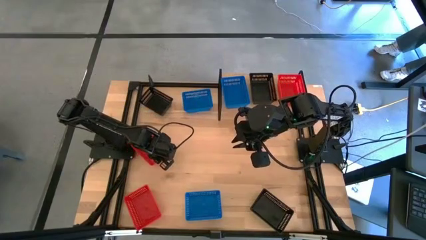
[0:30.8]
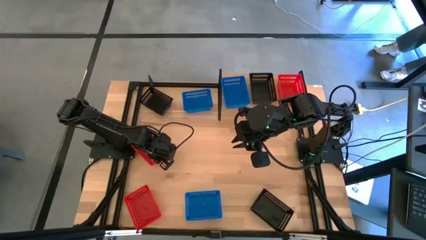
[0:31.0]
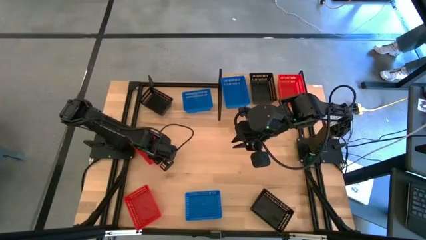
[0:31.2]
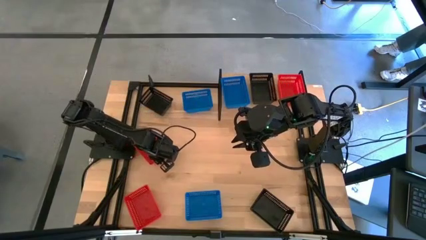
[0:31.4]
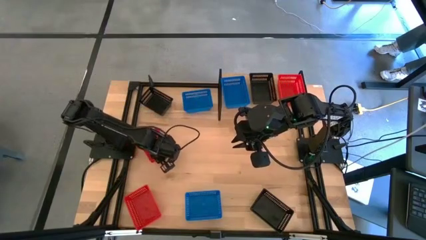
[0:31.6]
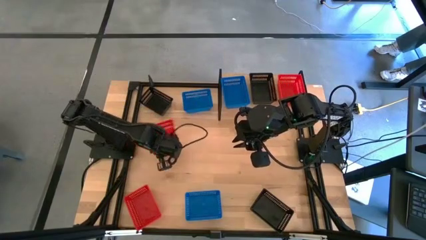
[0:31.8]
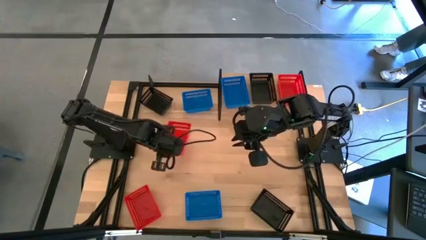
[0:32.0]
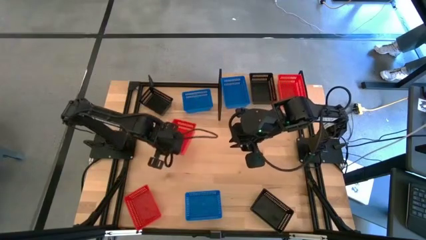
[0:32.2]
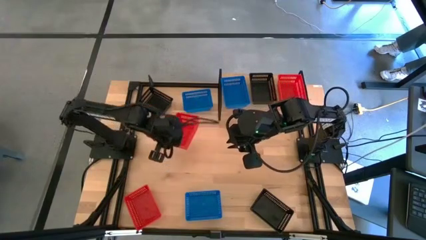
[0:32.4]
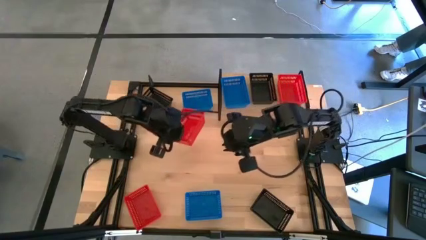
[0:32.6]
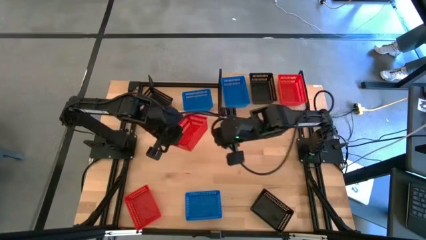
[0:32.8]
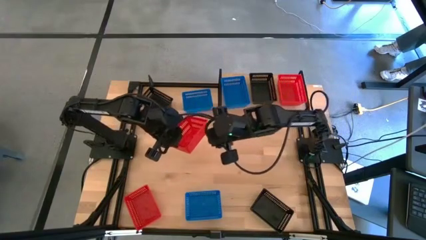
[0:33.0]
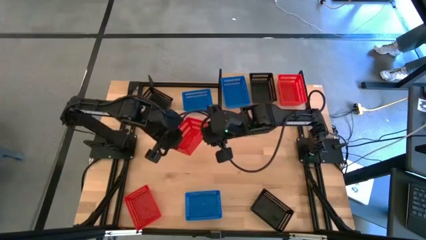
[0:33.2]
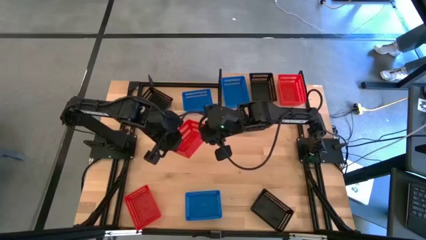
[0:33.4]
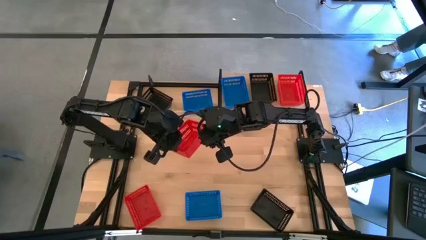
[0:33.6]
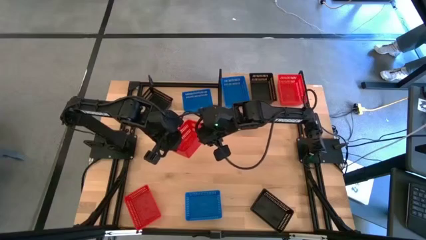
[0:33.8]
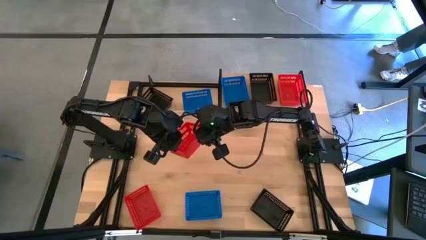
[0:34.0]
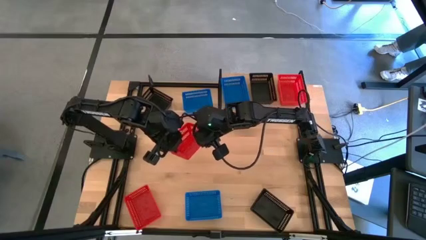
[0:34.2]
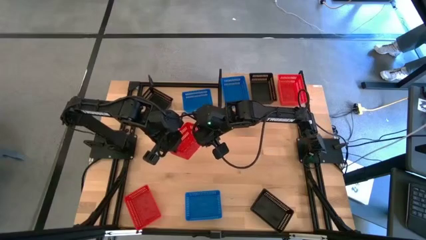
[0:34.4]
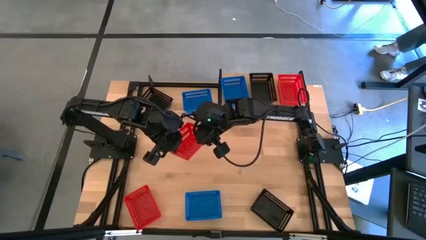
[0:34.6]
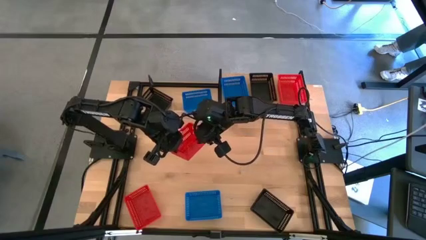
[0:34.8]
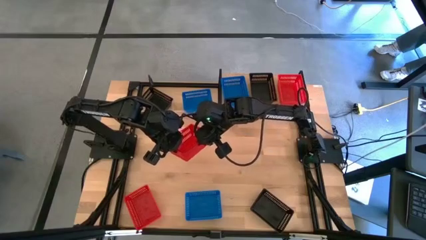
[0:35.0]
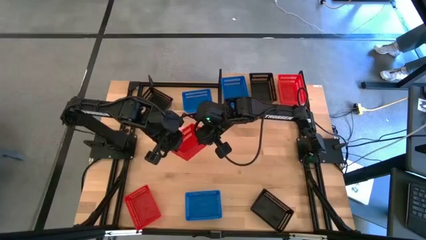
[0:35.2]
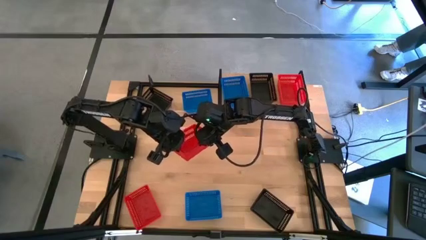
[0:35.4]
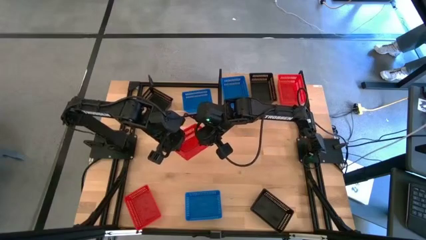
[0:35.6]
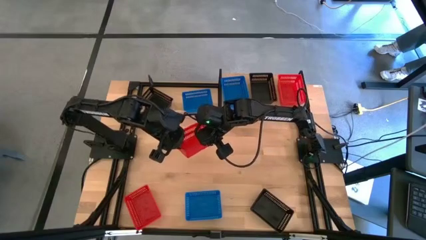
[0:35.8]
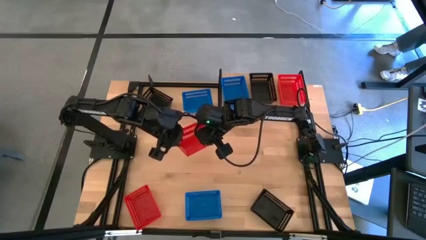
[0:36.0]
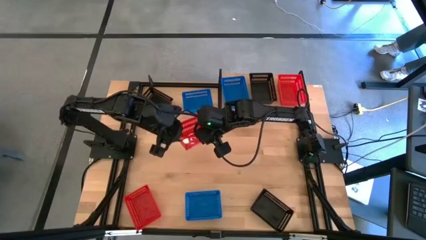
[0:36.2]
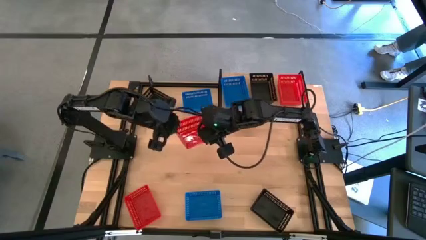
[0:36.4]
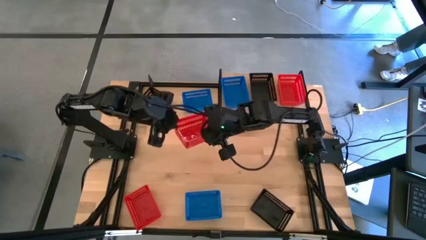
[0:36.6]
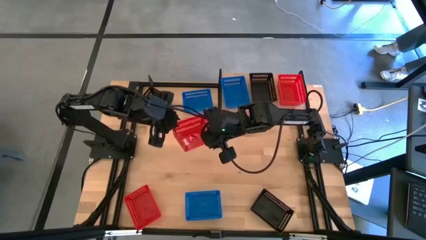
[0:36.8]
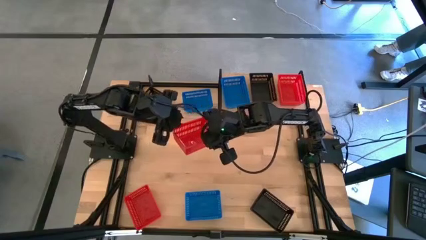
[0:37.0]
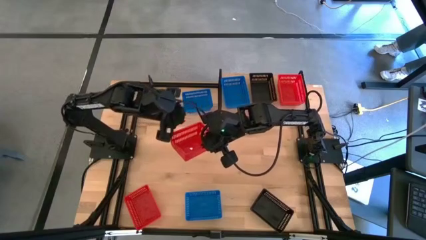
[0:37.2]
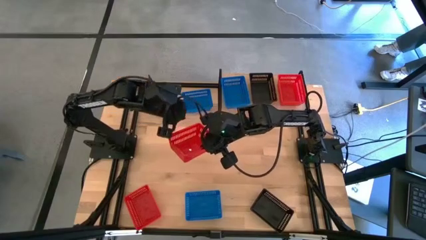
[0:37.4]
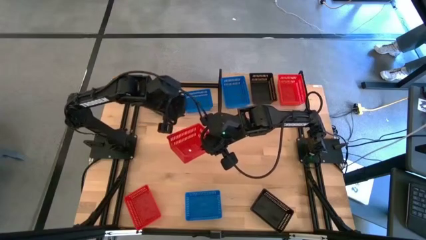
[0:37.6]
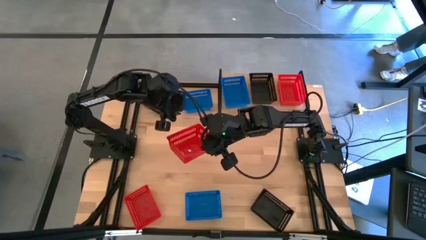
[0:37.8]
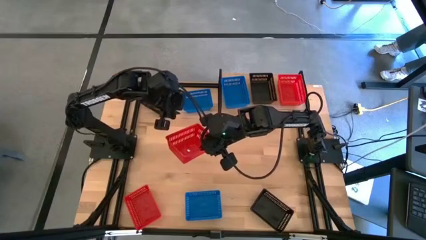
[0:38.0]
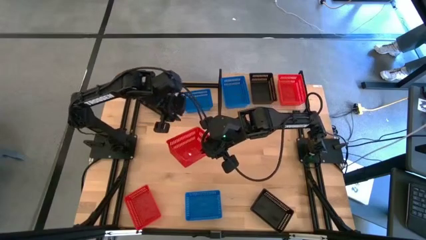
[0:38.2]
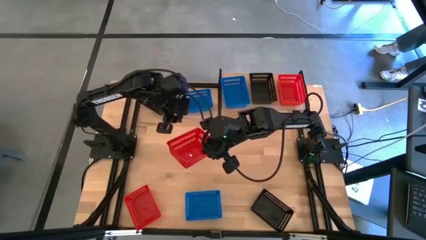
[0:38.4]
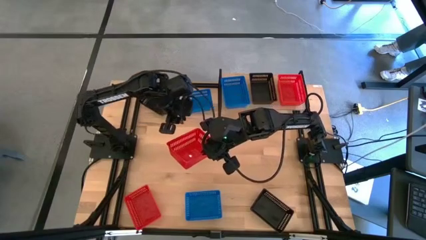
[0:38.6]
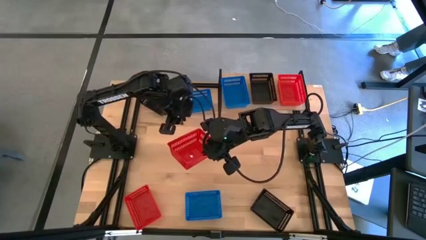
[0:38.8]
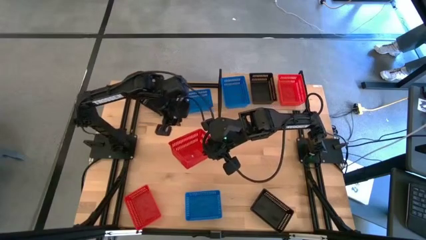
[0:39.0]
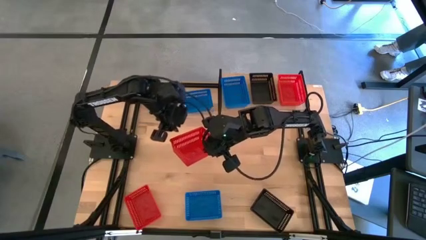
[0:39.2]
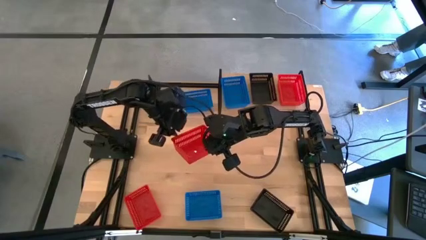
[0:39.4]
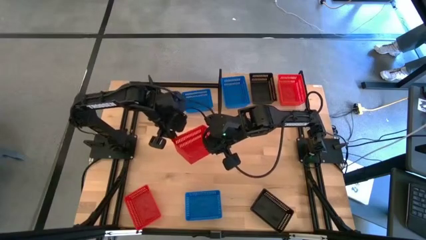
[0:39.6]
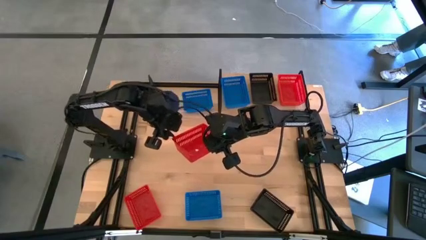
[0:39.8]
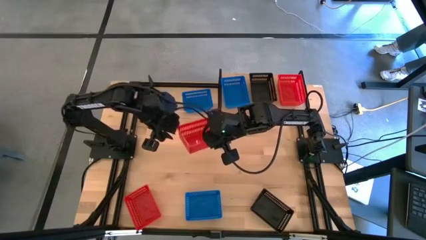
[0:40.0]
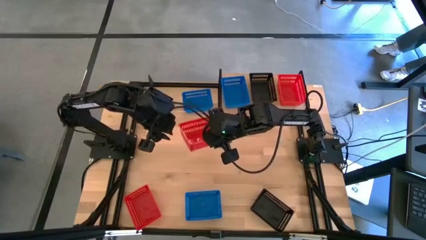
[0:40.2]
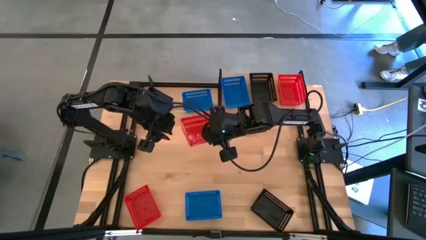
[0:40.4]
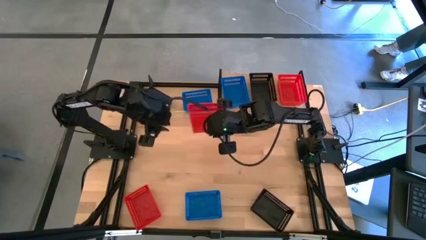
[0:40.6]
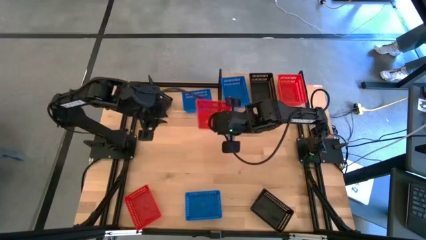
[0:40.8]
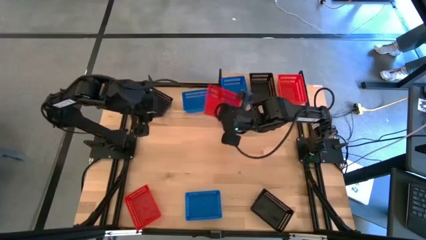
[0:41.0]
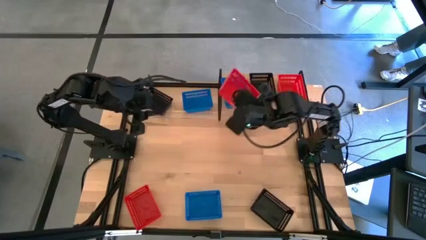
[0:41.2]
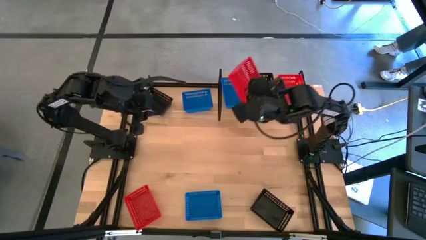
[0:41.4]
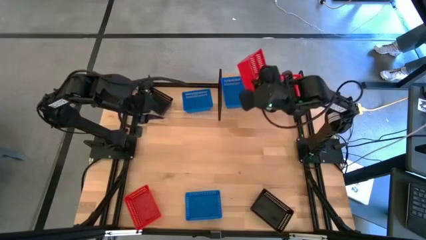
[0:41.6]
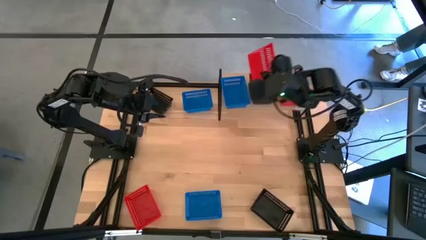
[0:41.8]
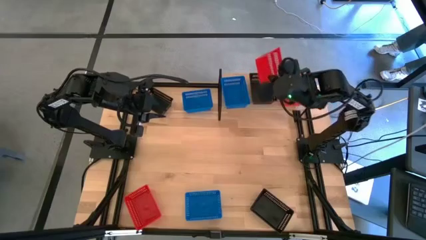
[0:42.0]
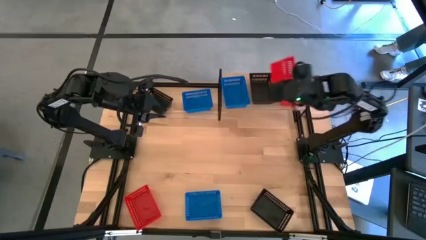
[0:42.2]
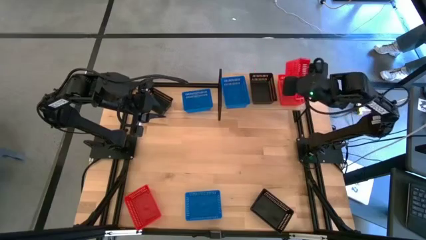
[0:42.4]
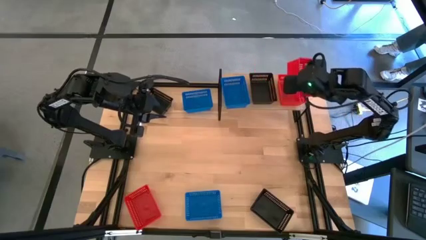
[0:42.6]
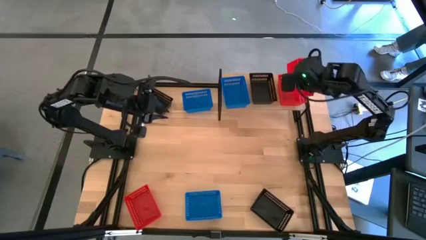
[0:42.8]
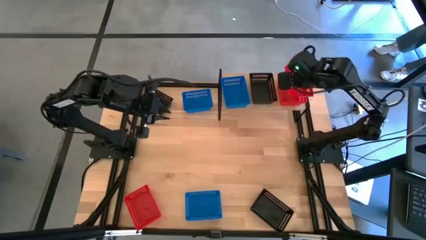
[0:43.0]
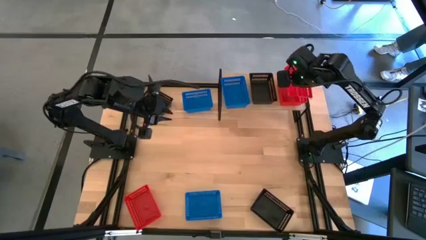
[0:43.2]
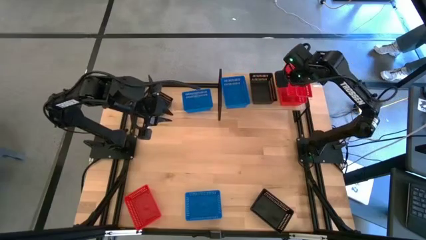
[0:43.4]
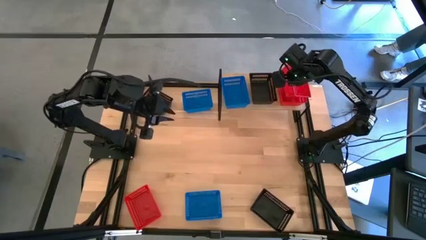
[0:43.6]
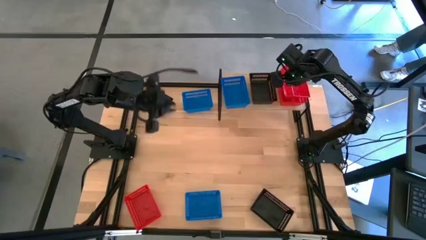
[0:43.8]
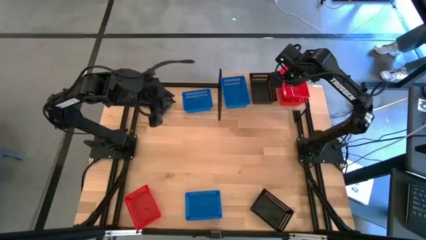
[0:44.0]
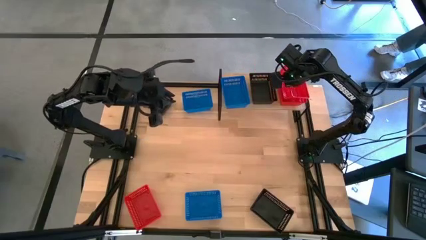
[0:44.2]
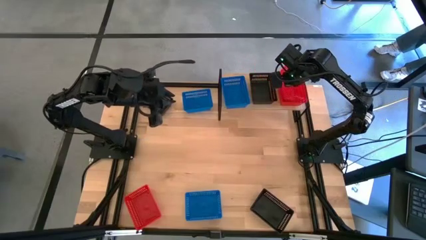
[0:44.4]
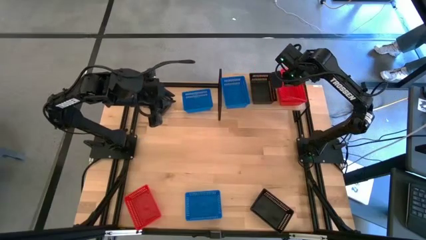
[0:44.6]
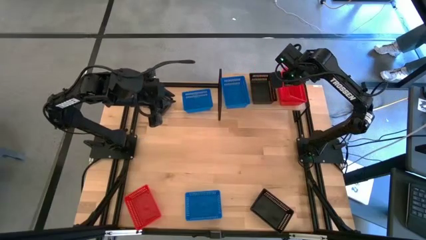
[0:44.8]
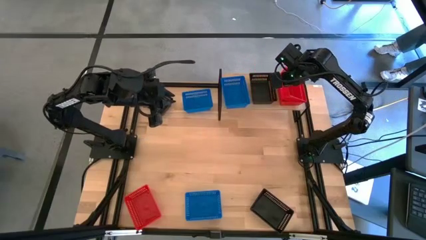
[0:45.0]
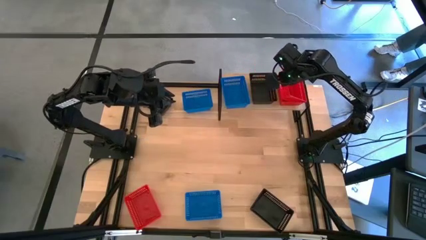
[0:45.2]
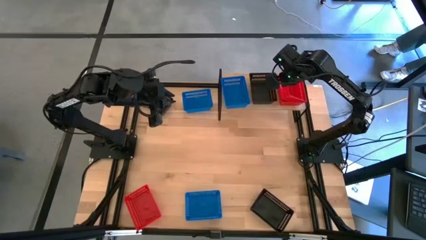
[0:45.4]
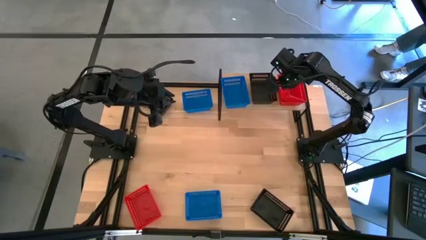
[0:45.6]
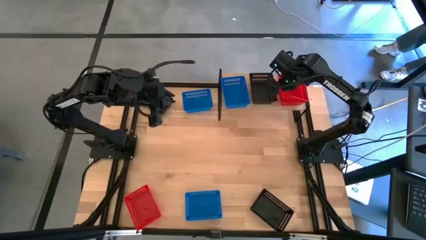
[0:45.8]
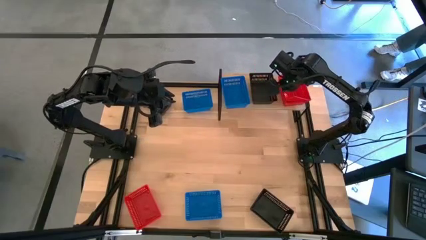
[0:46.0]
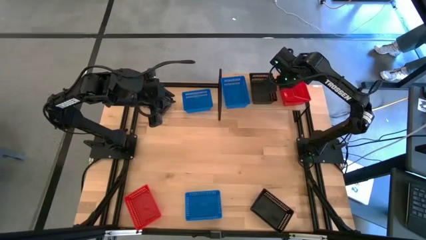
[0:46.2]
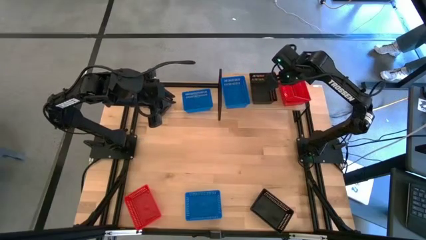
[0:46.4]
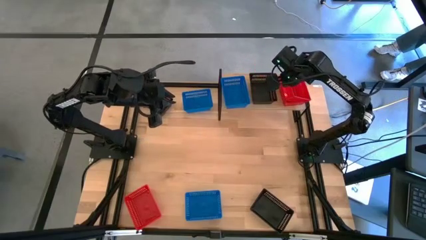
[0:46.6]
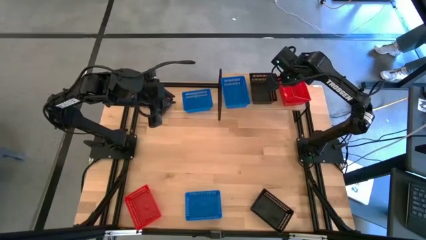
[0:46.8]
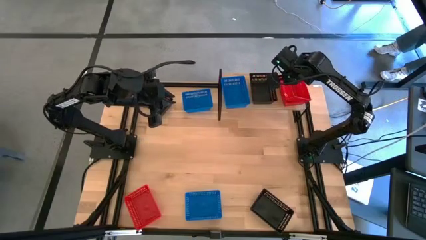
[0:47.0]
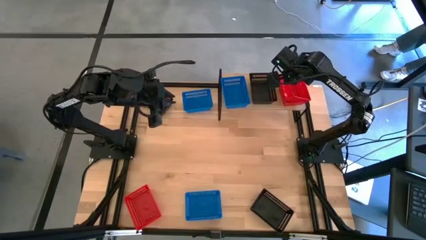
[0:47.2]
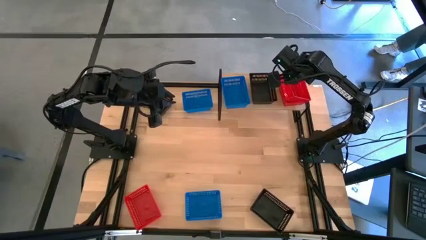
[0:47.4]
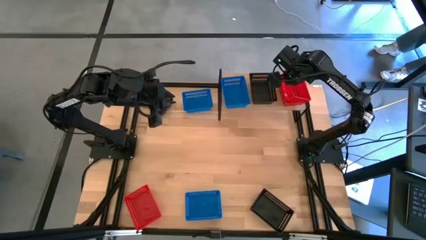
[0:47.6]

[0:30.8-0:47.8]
Task: Stack baskets on shelf by color
Stack the top red bin on the red bin on the shelf
